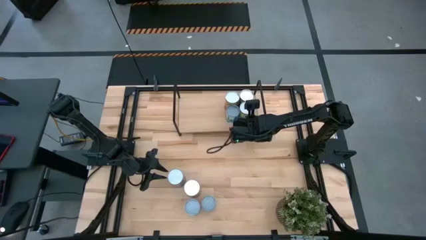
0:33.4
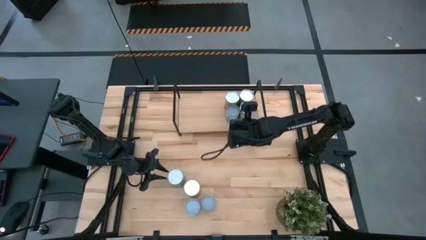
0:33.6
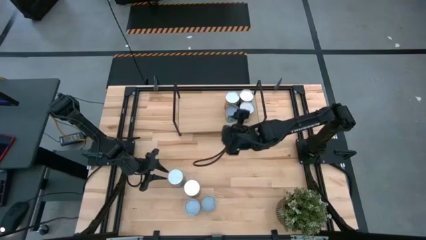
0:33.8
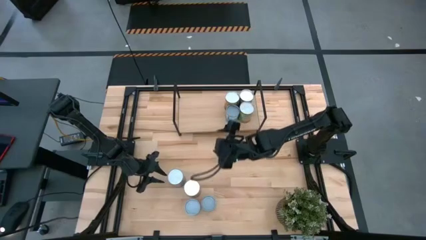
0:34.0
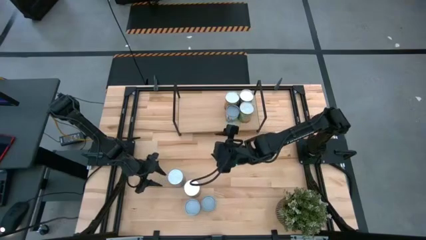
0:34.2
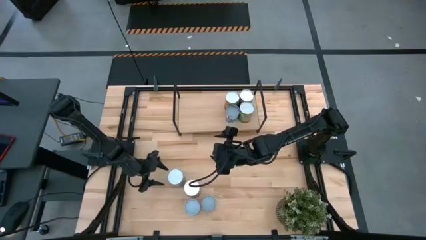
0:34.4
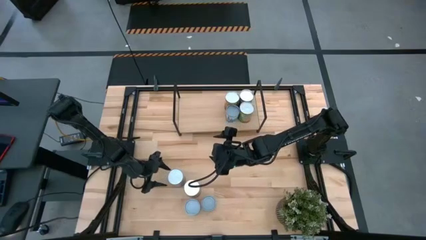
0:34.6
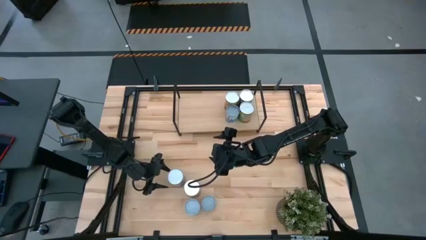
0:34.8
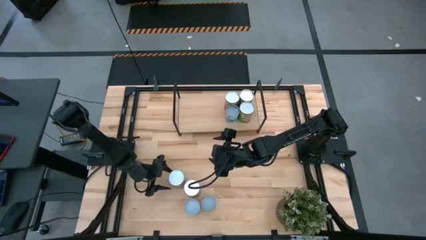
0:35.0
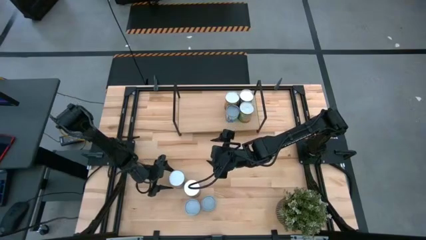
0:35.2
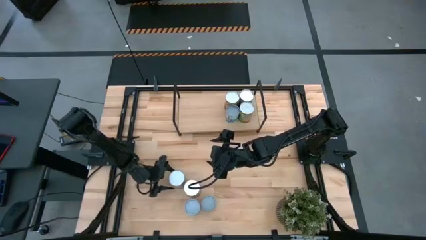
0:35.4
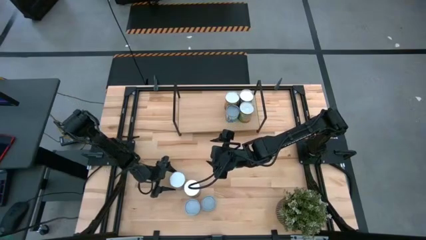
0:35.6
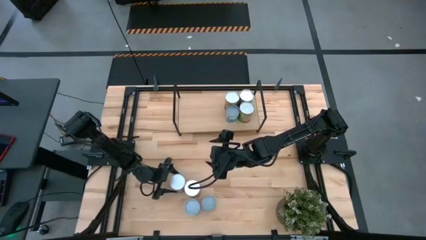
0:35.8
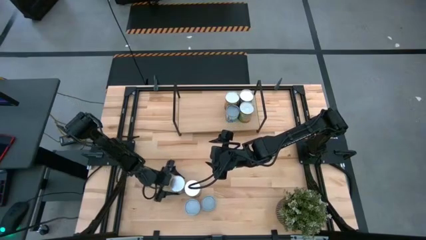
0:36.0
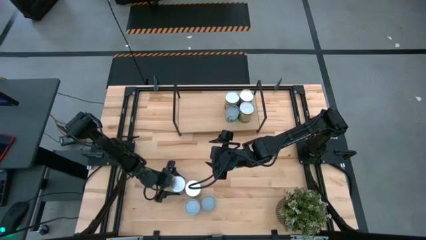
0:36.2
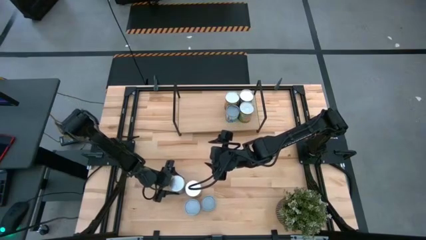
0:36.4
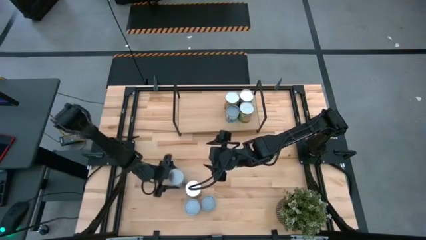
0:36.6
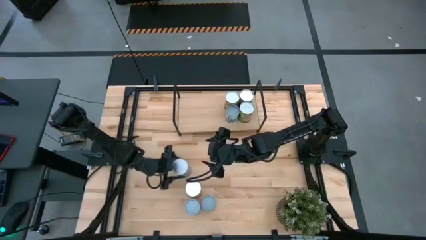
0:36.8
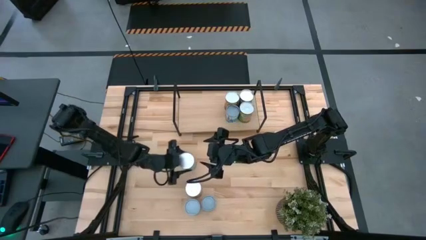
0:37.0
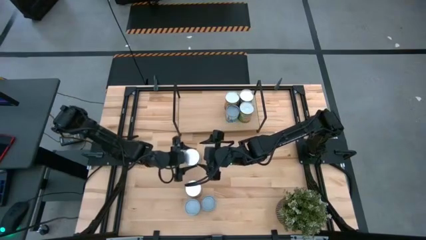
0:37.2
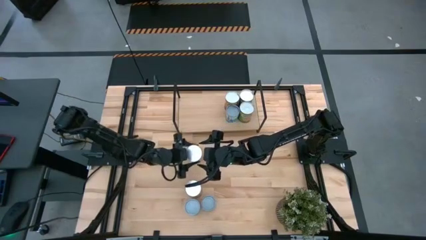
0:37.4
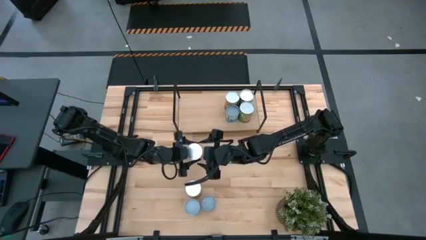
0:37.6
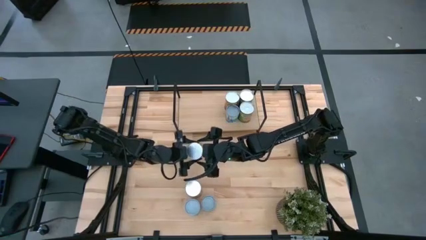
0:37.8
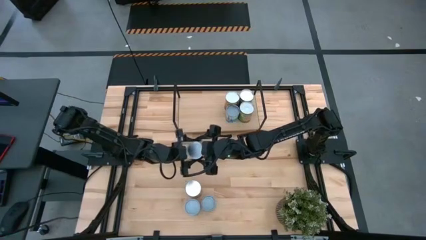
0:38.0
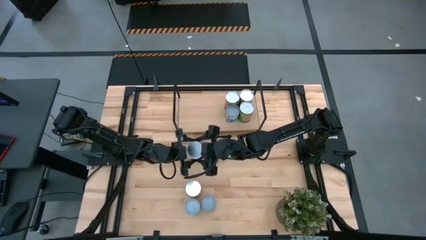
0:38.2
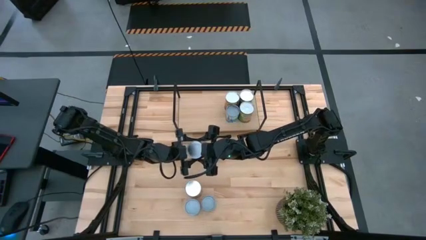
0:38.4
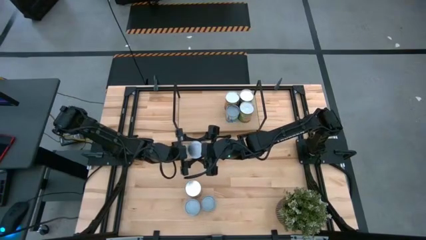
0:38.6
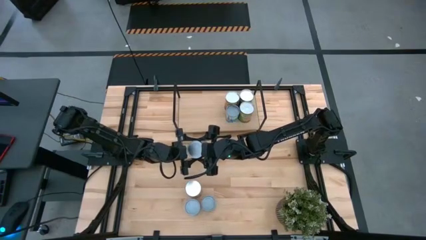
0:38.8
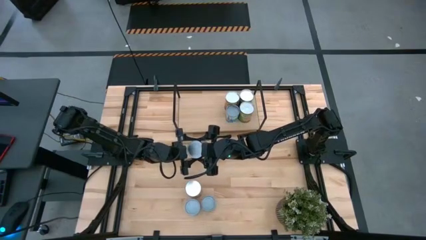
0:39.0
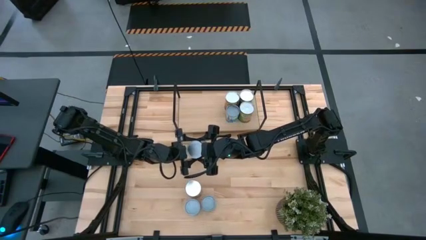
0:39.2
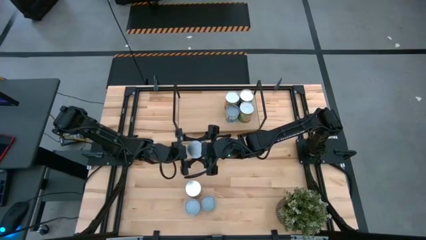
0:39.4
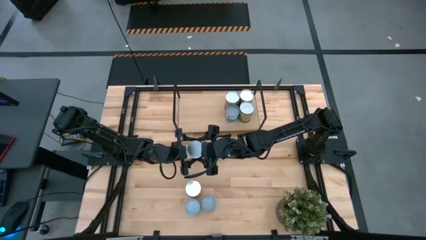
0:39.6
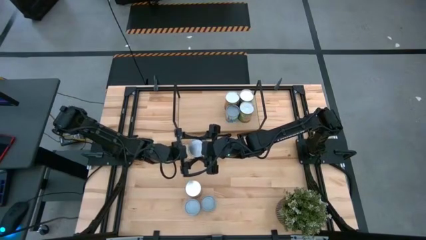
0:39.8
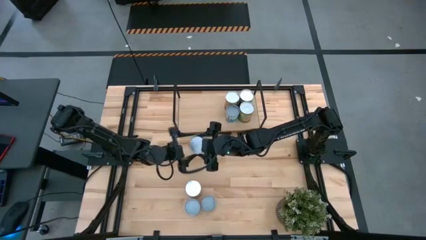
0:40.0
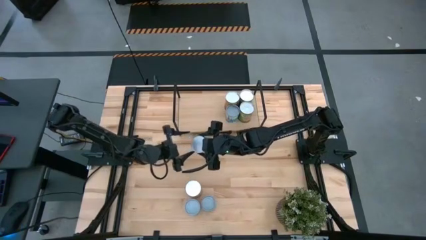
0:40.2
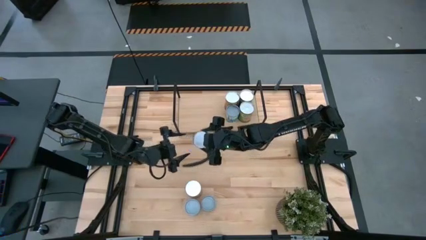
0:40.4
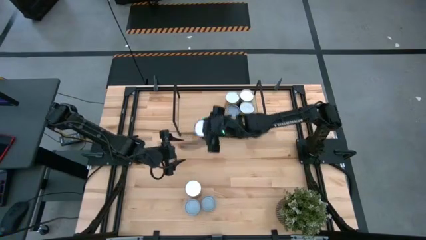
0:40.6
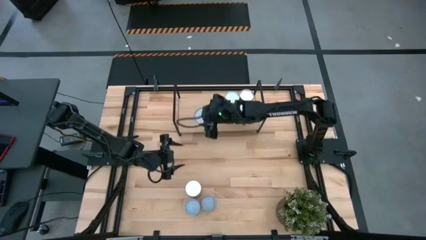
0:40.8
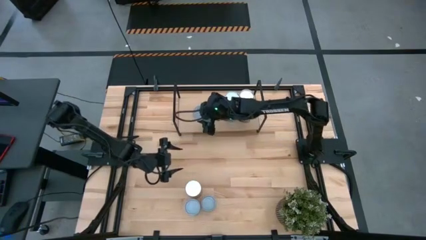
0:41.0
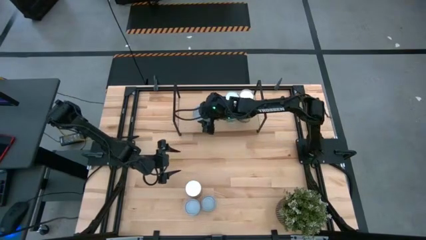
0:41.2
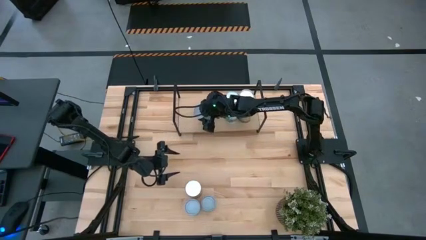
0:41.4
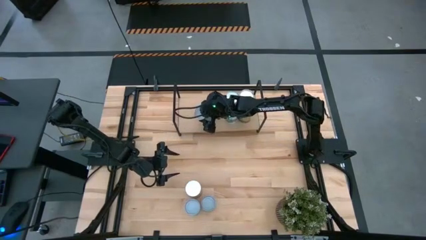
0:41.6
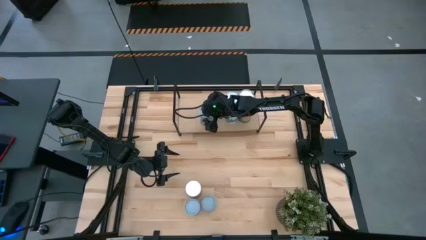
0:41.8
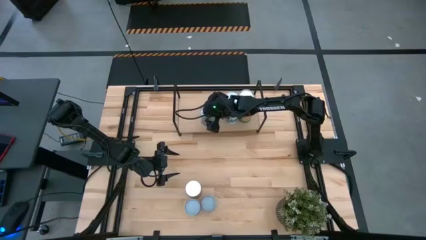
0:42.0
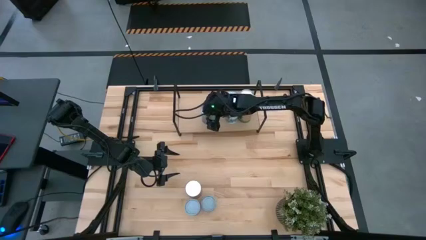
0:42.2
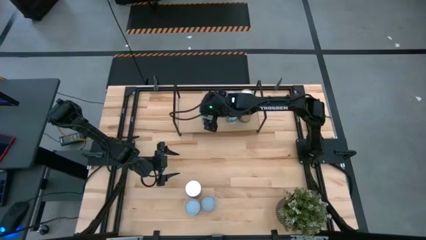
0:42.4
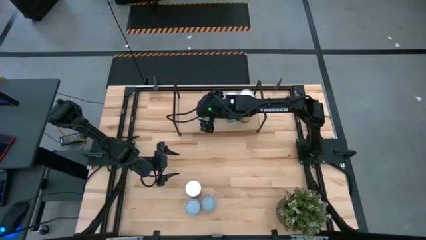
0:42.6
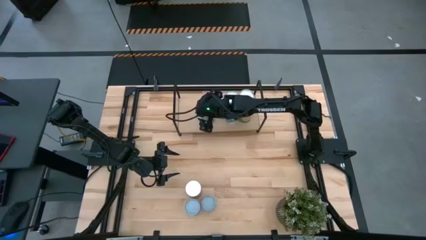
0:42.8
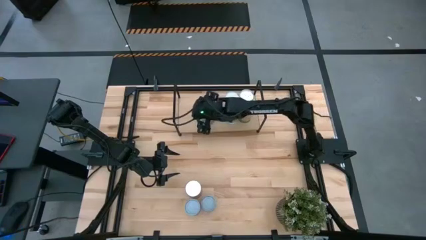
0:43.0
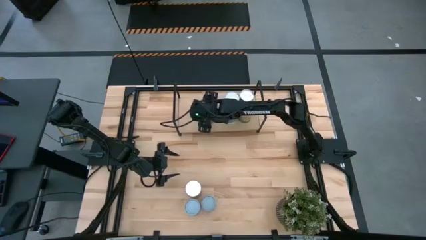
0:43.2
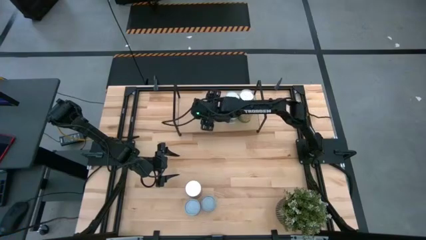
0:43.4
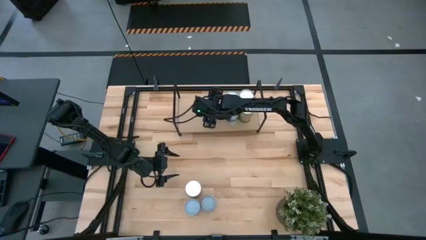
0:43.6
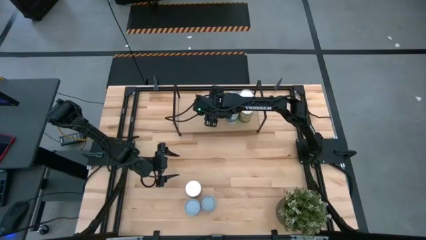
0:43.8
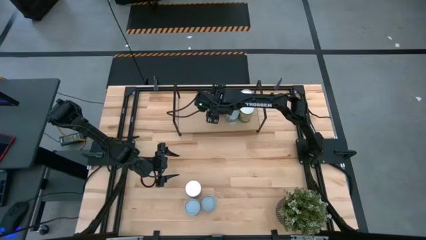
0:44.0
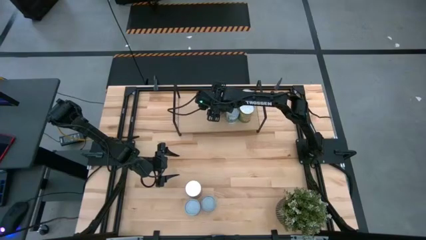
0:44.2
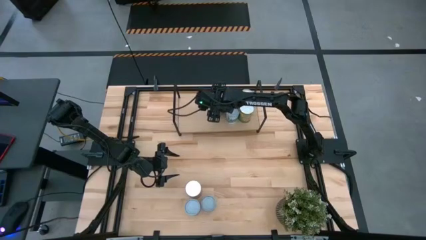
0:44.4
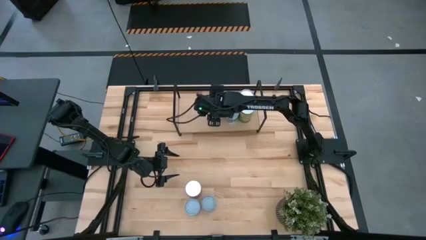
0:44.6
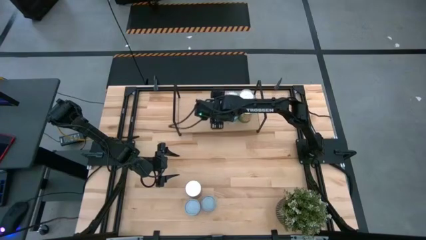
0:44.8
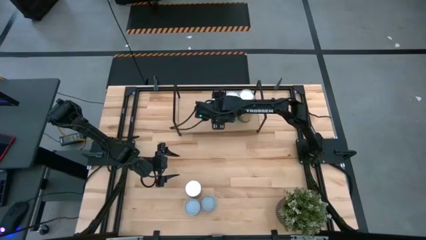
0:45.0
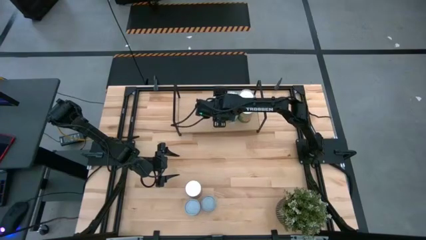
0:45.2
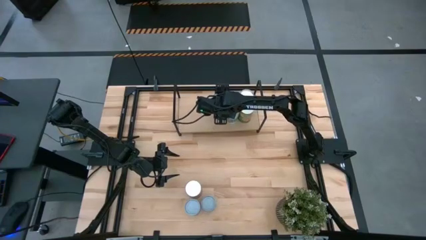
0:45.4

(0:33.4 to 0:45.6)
Task: Pick and place cans onto a shelf
Put the canned cherries on the shelf
